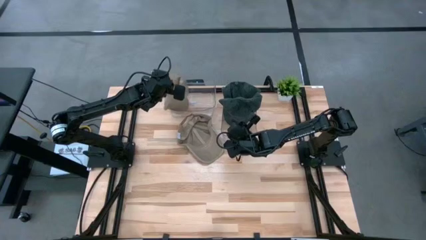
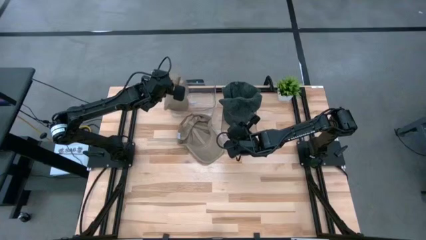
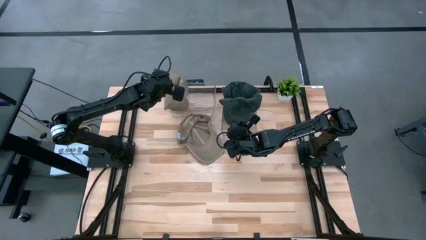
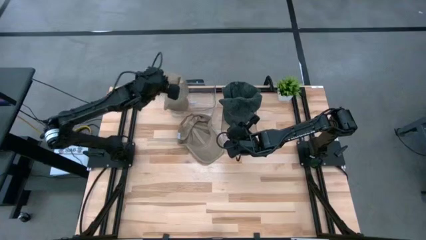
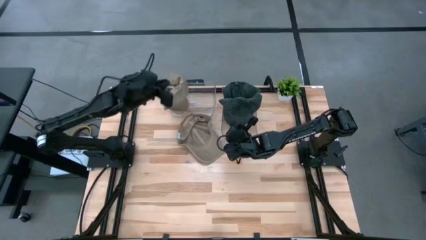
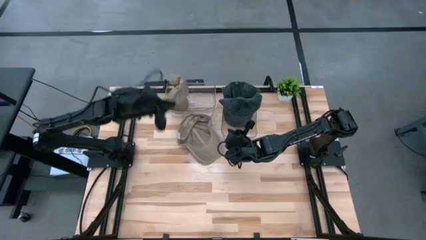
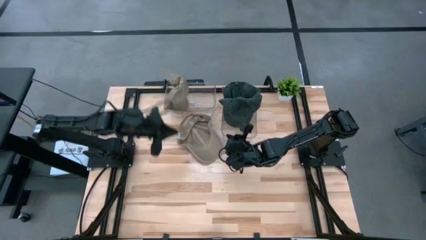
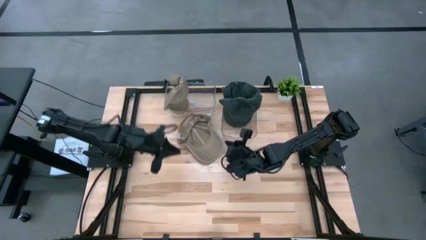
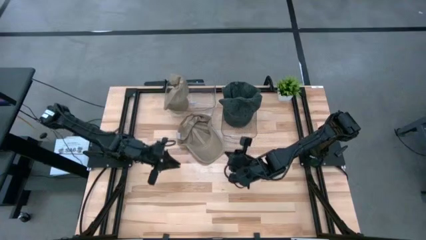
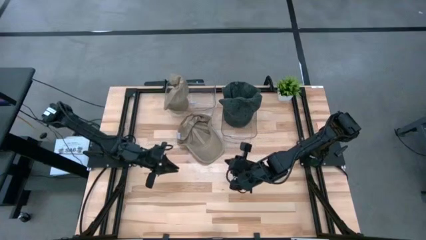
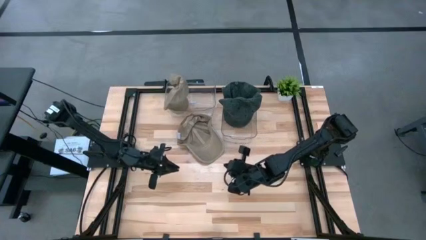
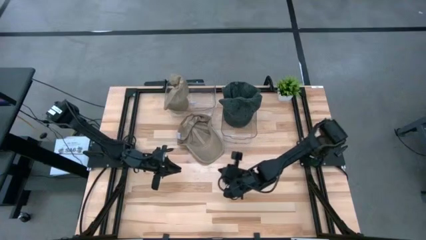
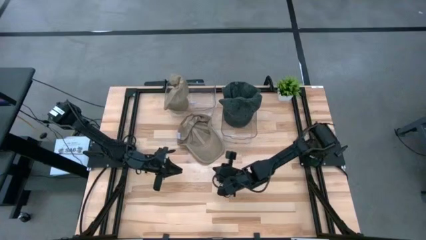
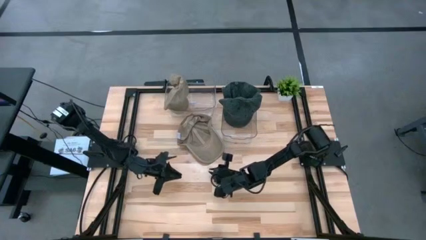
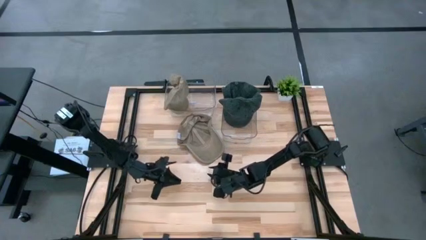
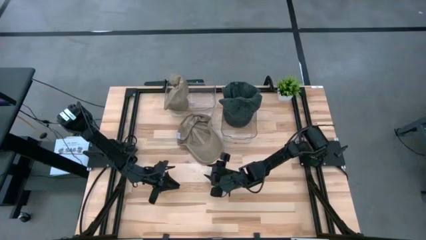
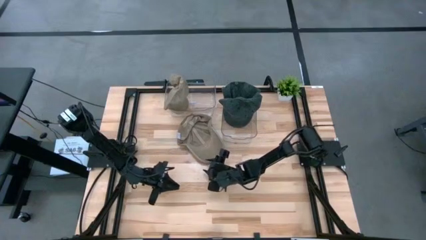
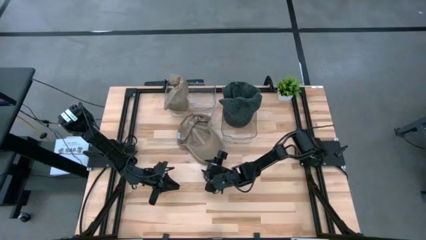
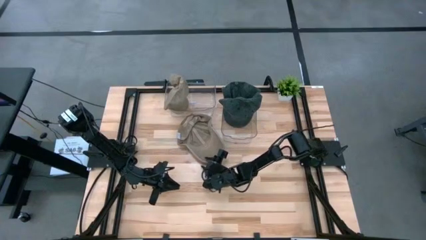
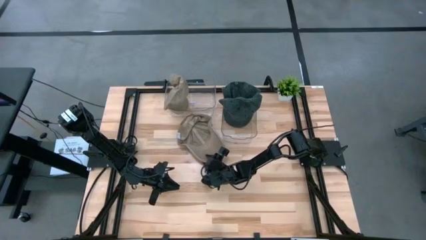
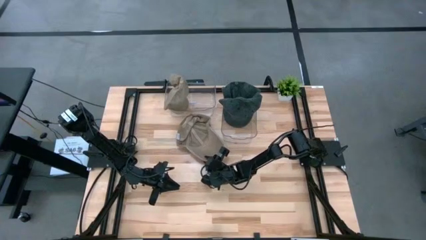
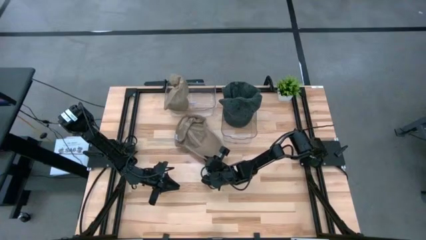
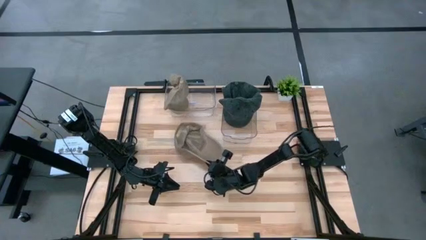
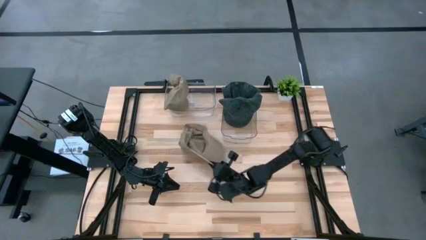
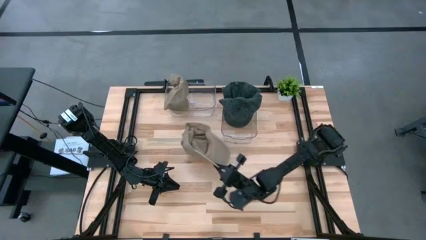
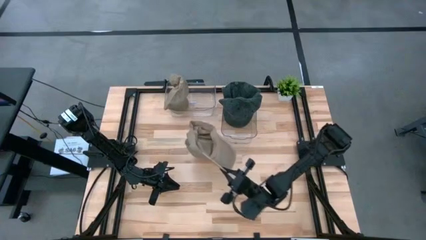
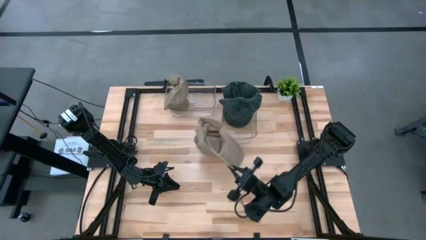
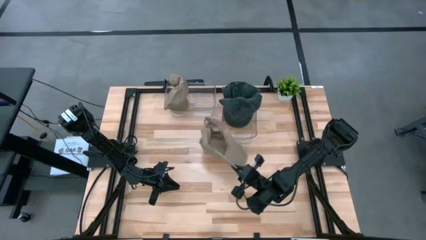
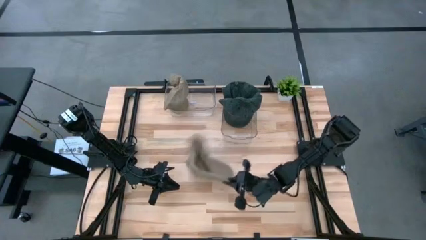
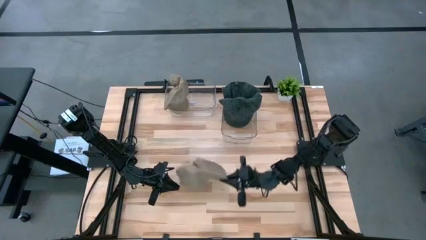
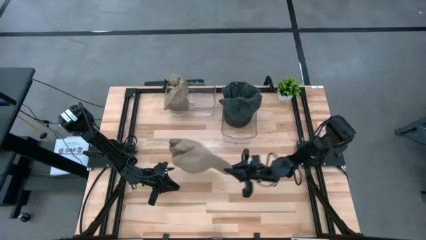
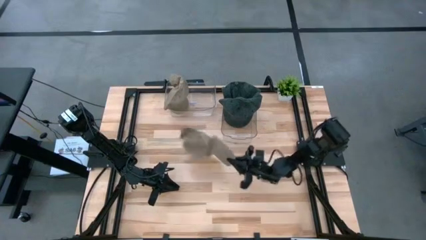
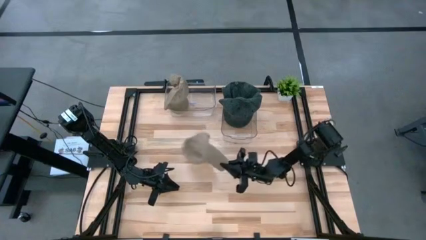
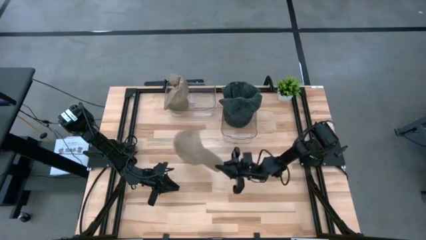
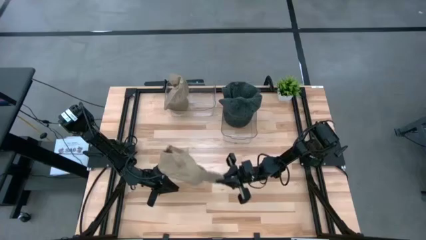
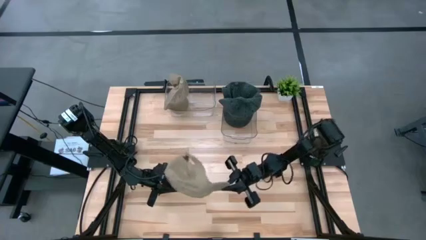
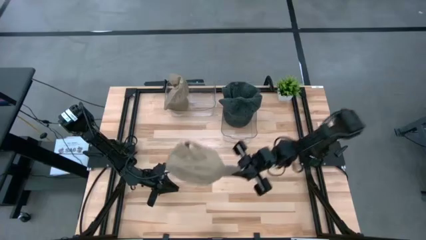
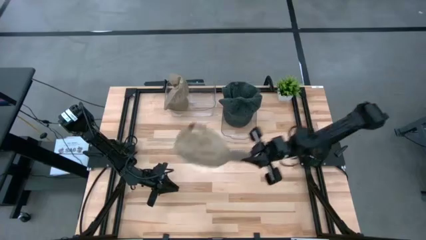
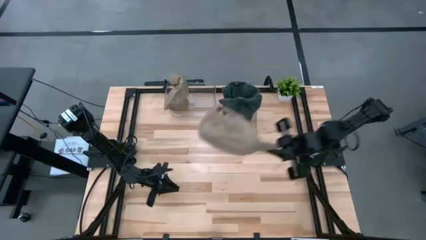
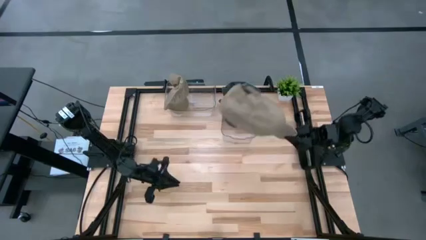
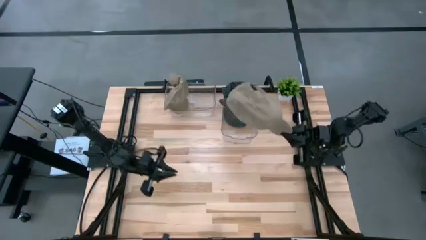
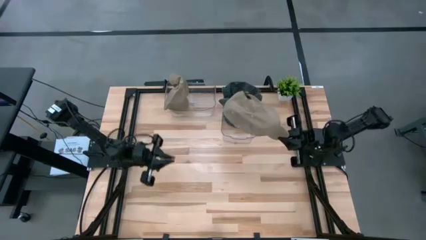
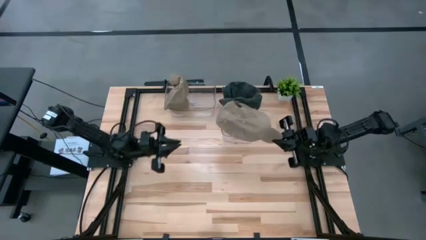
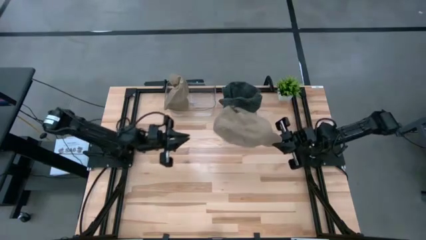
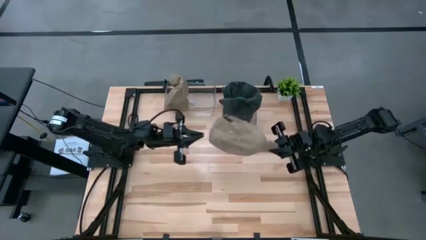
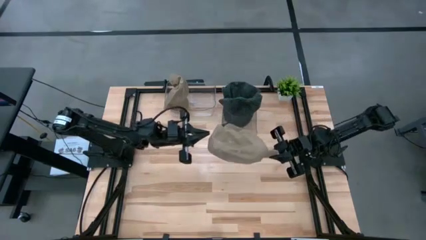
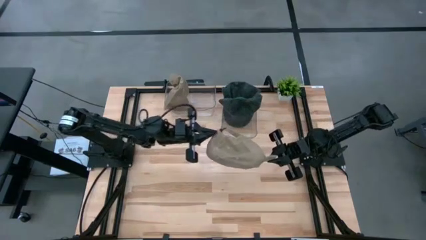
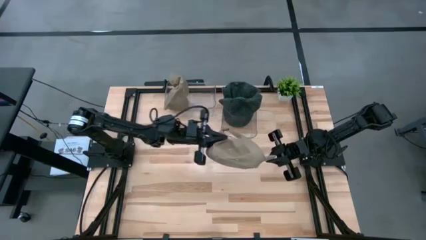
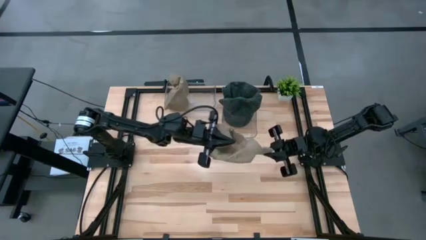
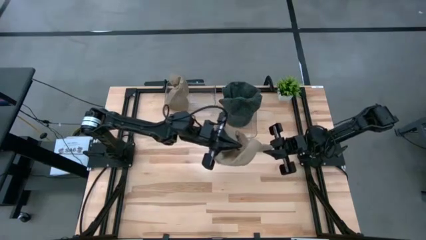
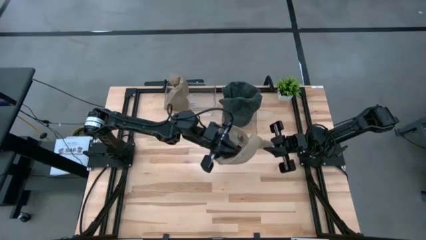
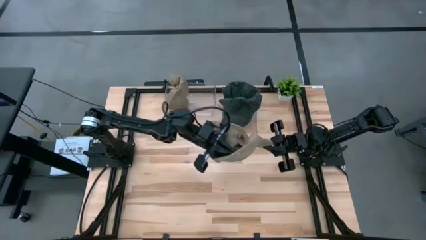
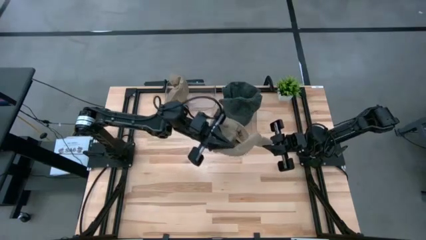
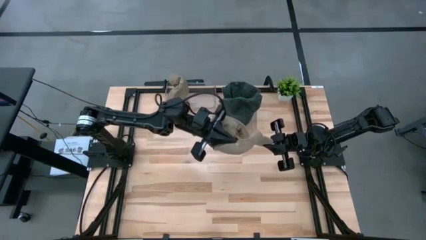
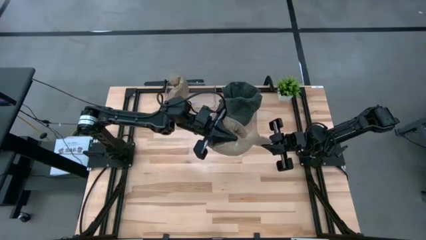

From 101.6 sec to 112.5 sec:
Task: Pick & Place hat
Put the brown cap into the left transparent bin

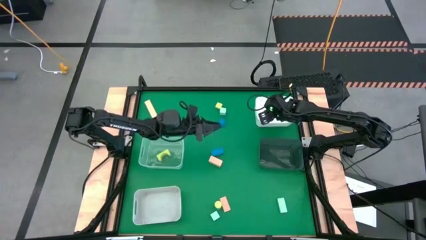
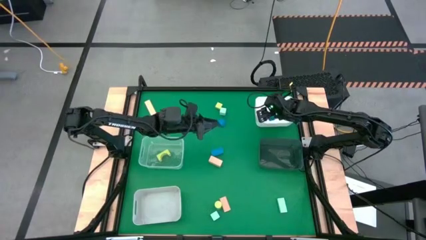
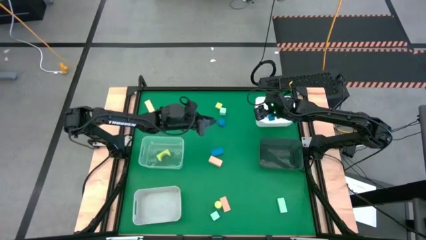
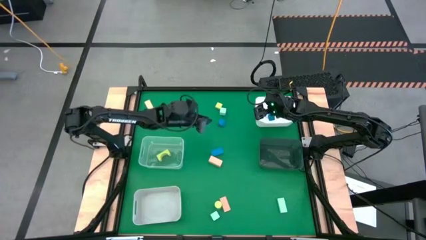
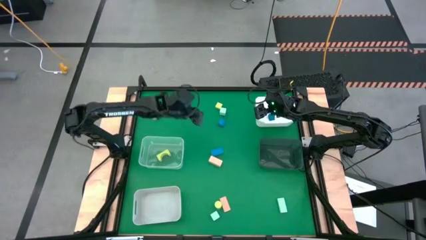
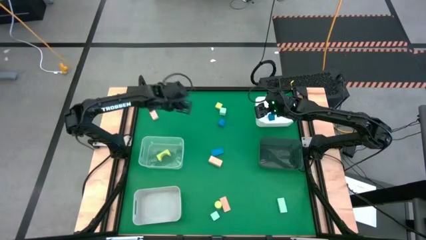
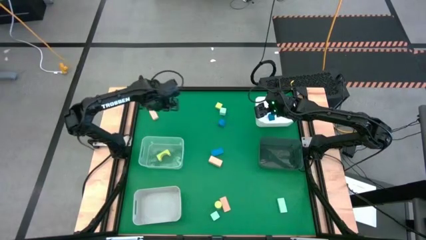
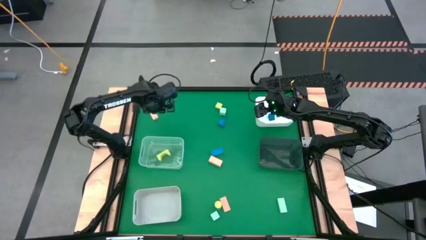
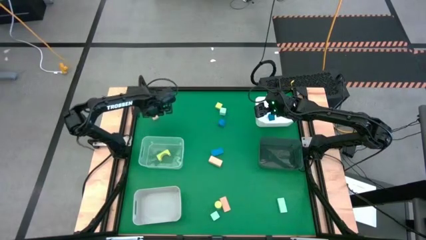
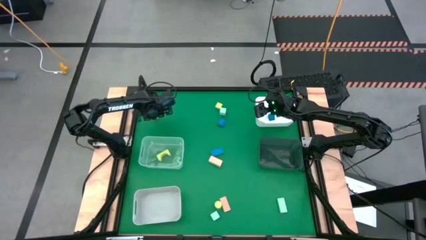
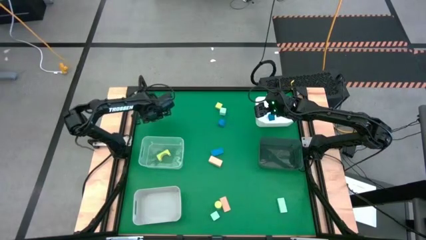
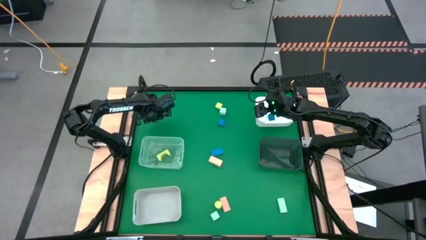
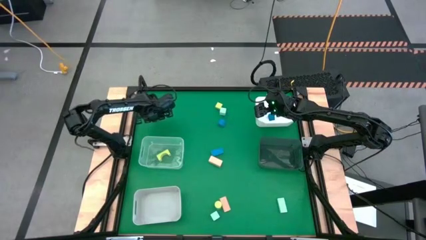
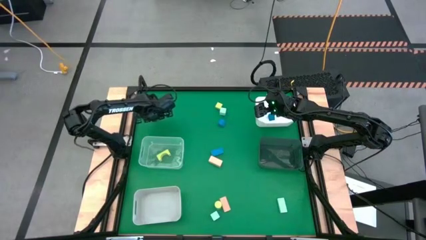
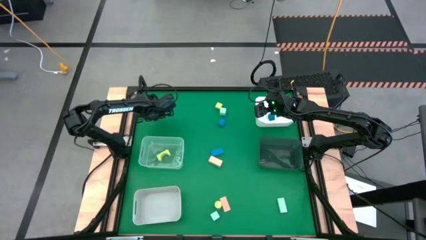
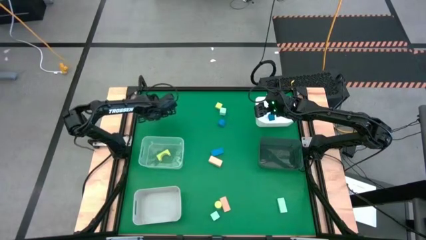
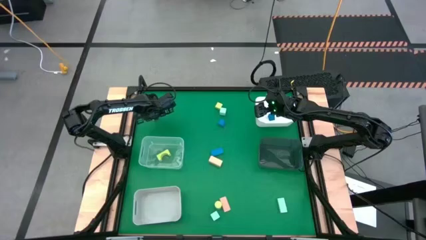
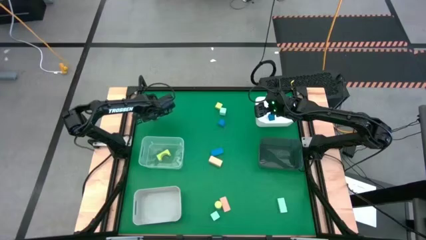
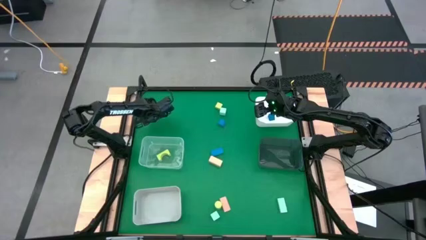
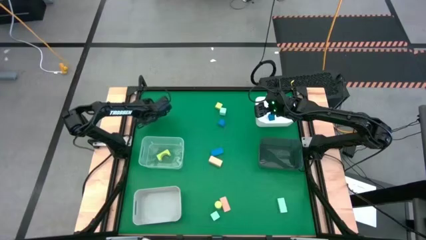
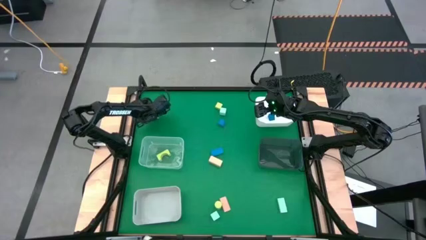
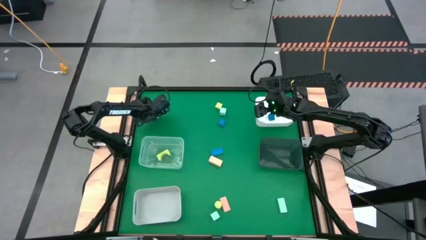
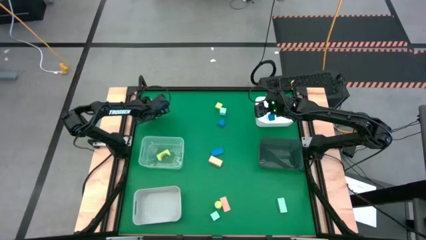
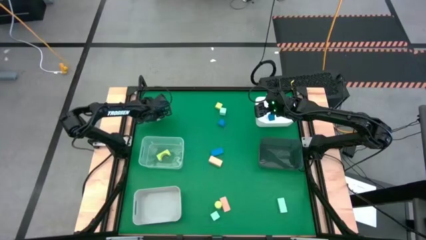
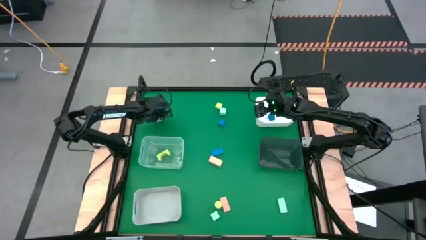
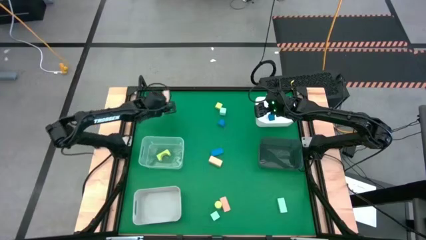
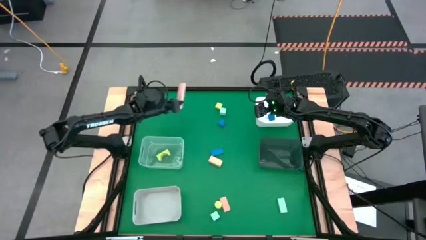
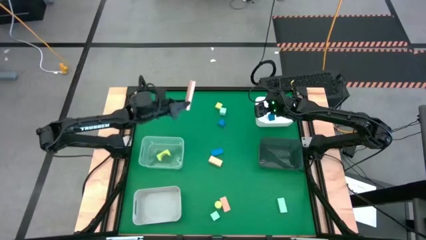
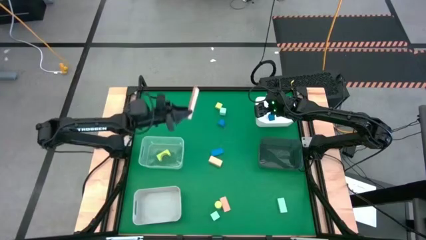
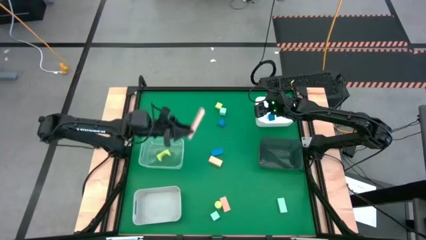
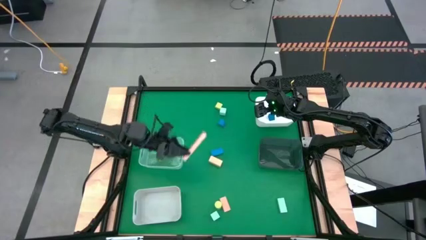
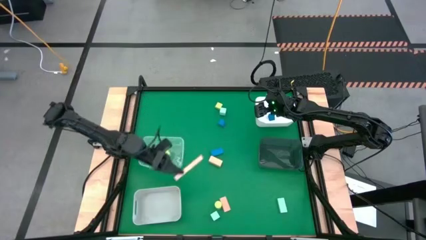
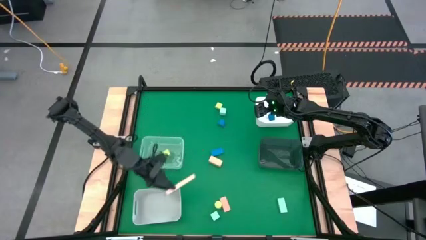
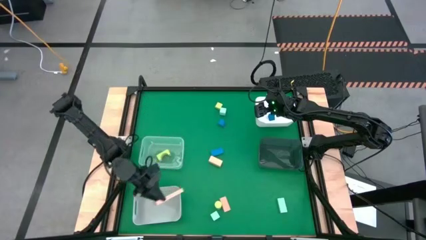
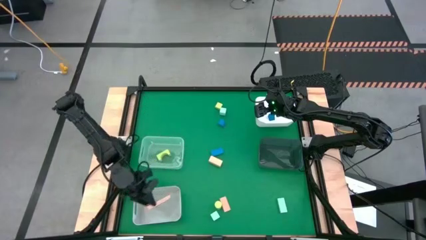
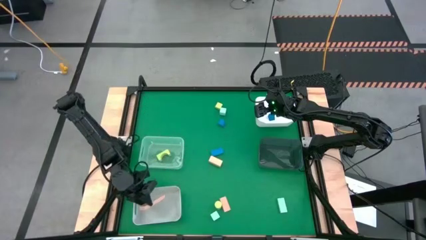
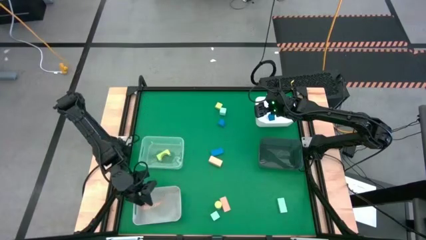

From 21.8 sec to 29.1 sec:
Task: Sort & place blocks by color
Put the brown block into the gray bin
